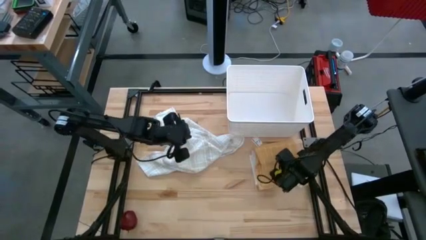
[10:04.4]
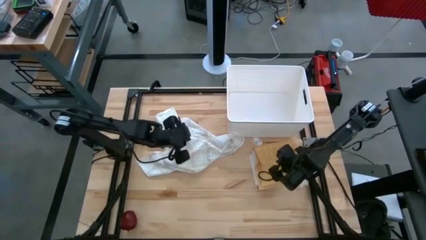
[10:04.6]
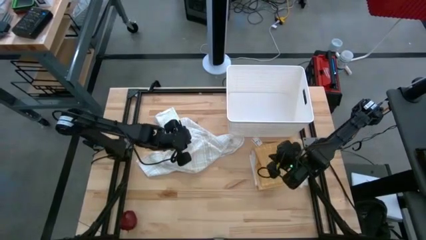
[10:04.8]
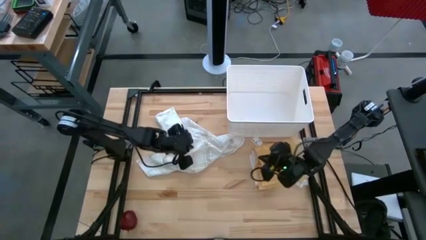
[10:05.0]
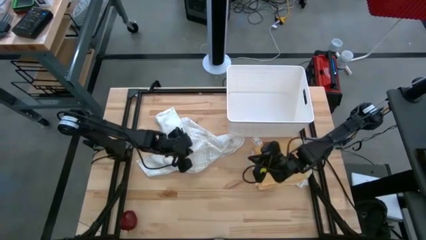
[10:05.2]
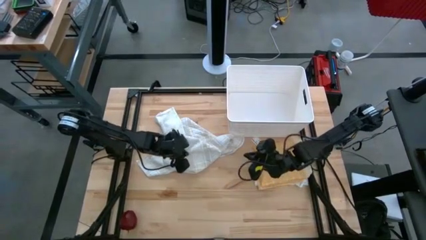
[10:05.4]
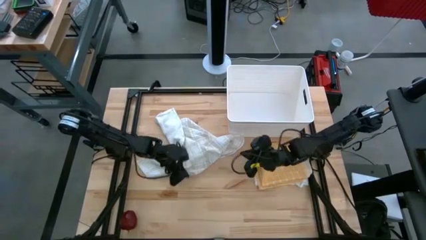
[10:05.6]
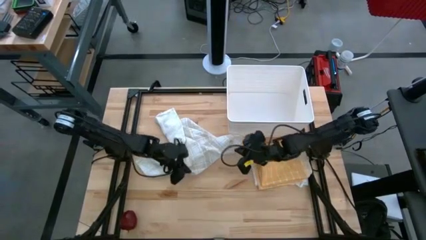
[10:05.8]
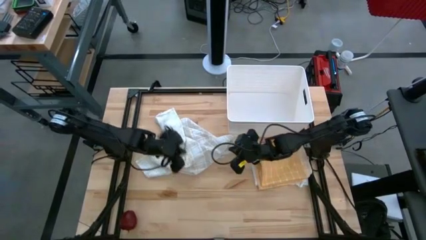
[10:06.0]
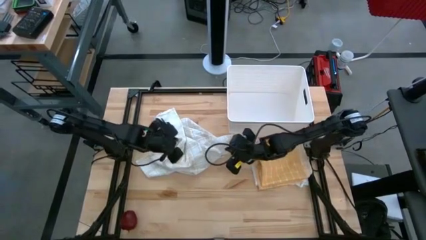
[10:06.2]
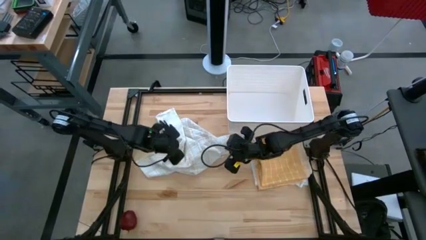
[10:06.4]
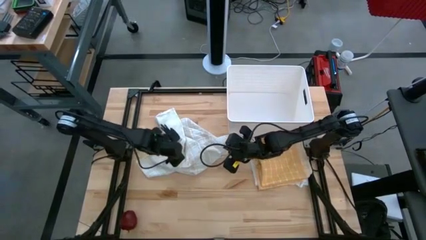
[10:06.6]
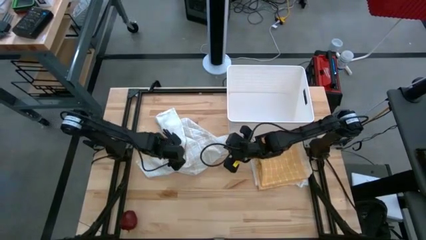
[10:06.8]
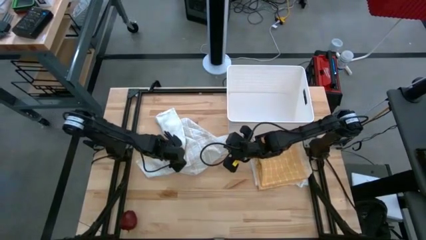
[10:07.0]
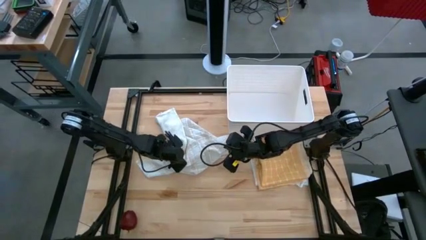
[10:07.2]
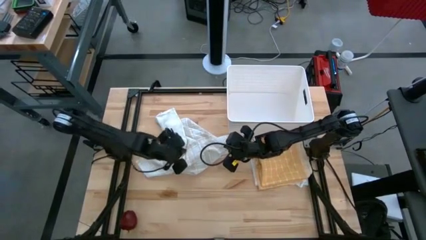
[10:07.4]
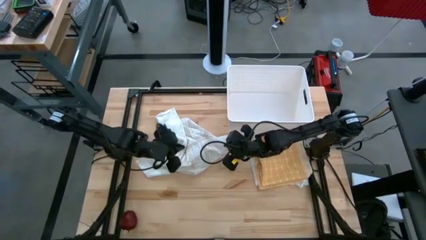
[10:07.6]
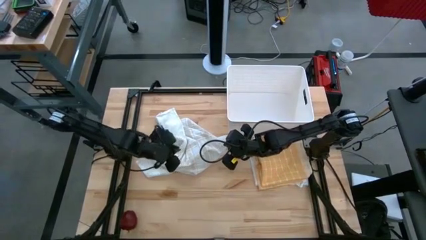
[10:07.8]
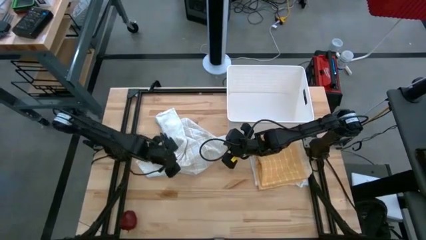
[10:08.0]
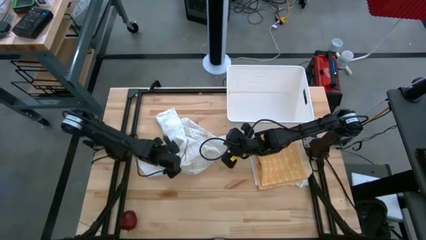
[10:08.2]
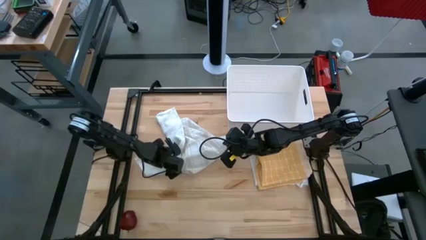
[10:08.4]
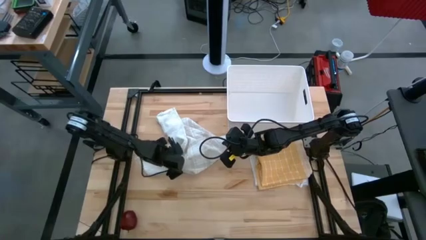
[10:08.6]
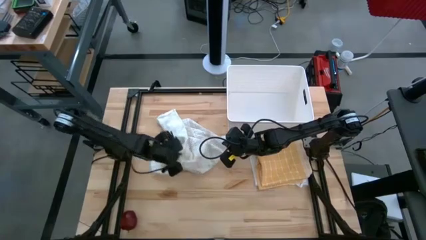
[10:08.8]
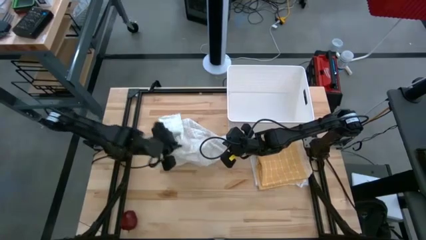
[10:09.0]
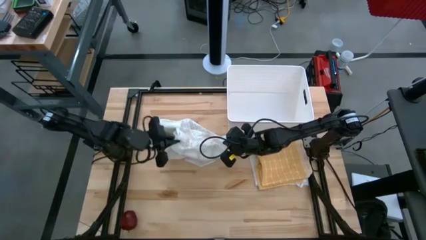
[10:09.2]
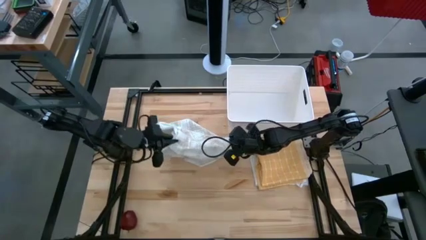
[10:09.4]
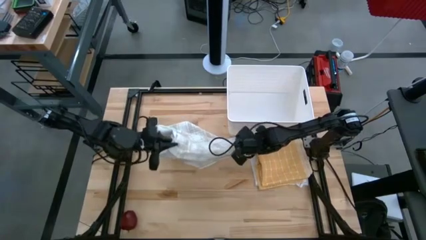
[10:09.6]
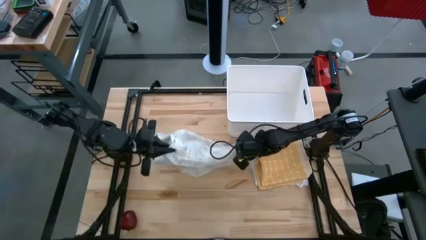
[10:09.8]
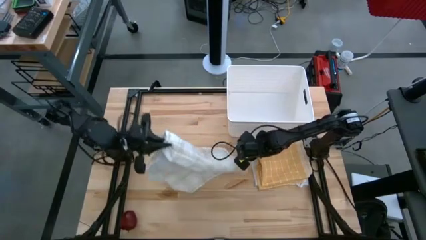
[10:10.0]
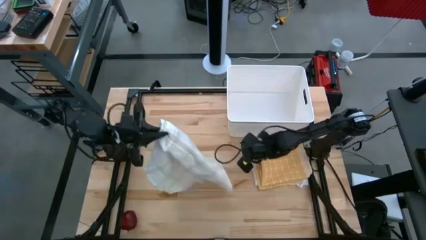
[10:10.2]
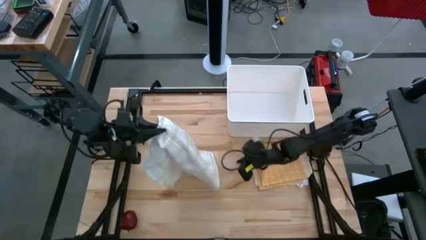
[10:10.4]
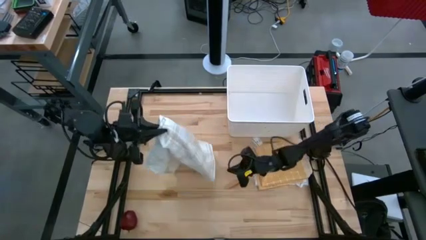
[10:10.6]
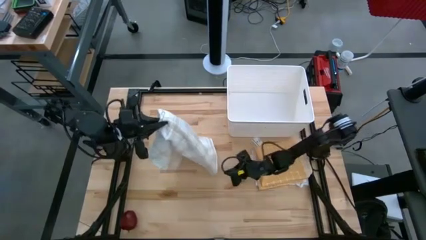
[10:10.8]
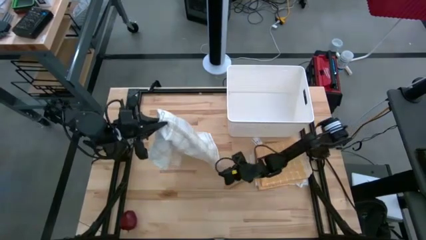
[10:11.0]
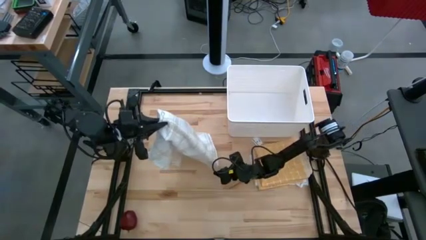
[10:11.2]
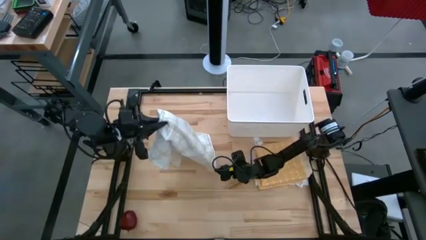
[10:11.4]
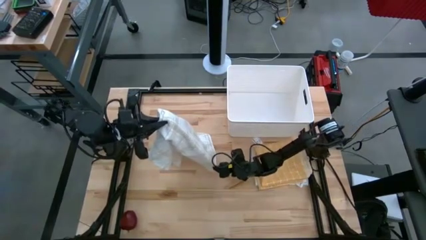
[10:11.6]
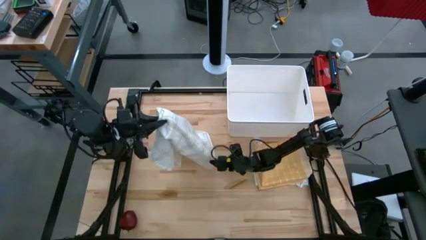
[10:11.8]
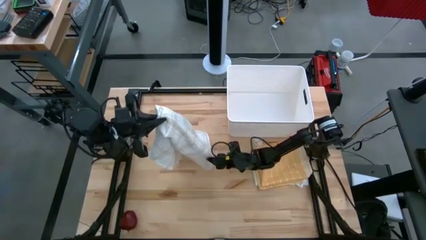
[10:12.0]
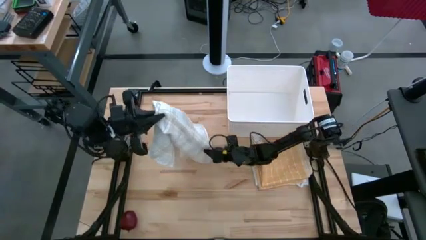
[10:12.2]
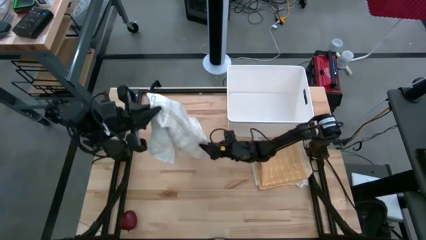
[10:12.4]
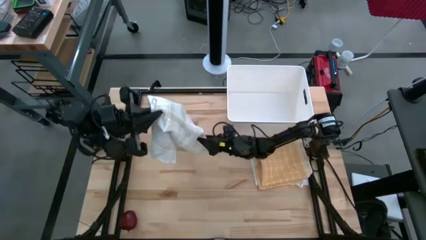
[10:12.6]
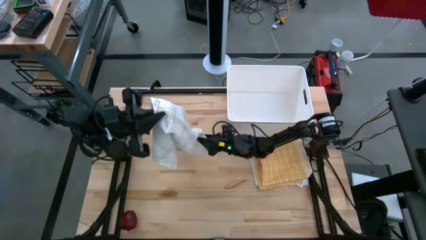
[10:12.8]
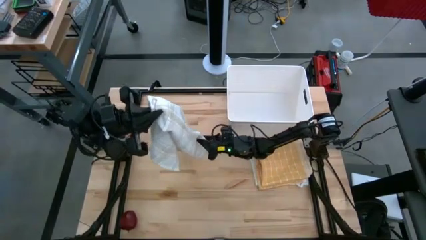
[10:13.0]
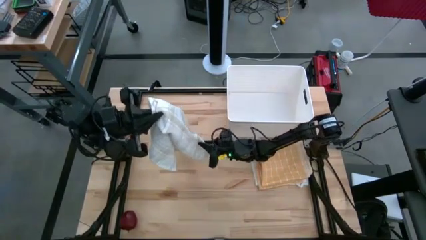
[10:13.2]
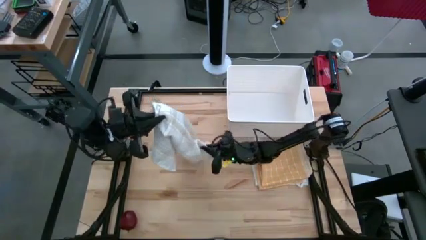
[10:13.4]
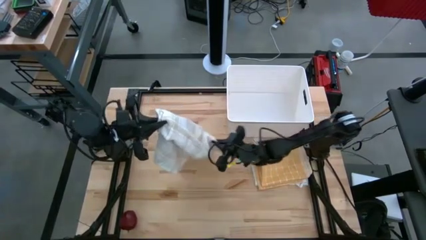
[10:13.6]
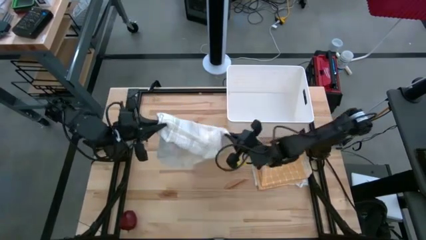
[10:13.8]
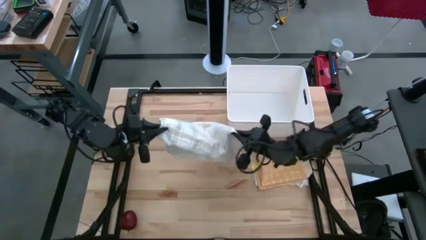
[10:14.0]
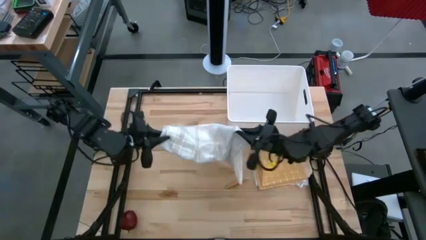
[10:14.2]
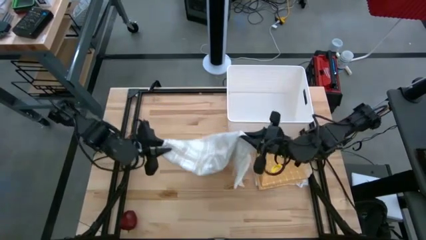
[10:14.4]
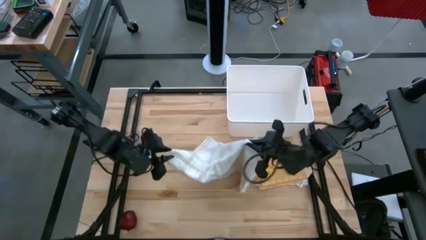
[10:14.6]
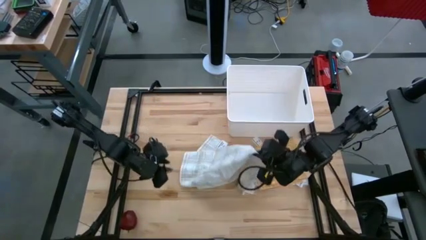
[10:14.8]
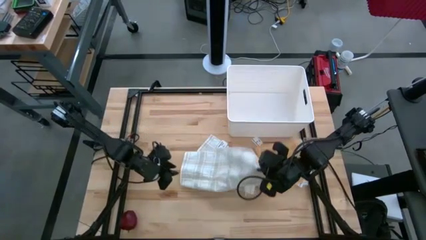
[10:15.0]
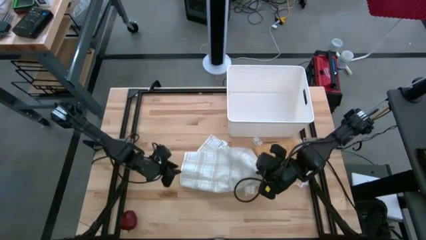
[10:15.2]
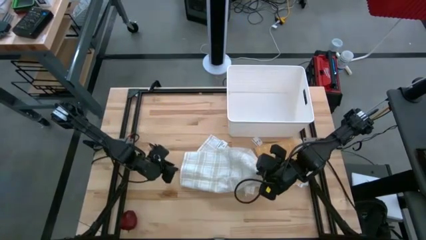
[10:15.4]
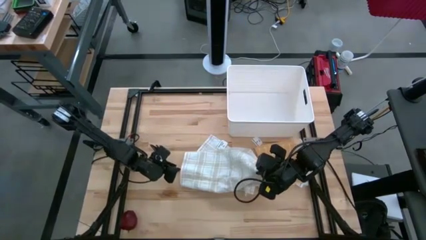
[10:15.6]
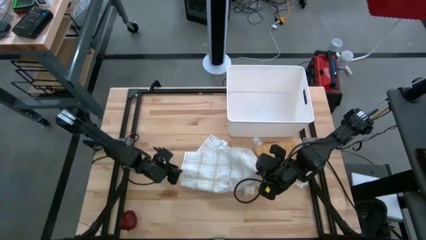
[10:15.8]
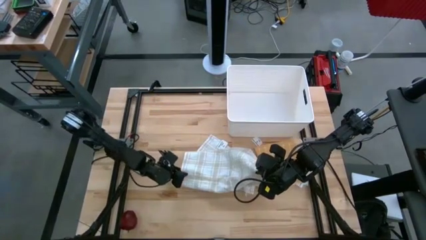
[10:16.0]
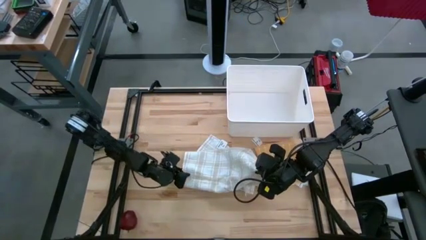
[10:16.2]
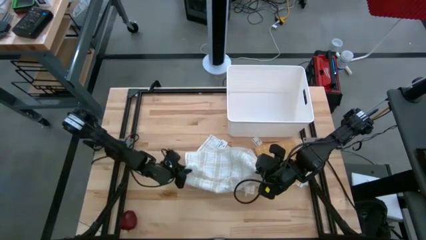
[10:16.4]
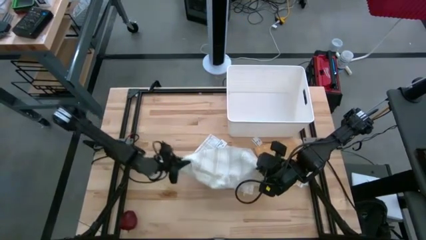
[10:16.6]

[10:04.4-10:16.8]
Task: Fold towel
Fold the white checkered towel

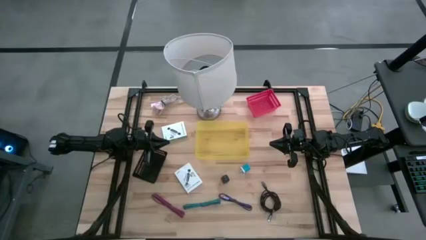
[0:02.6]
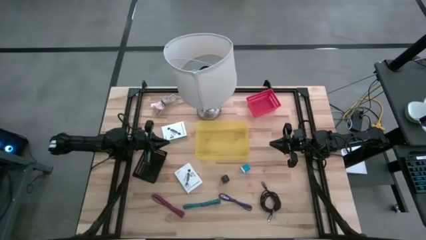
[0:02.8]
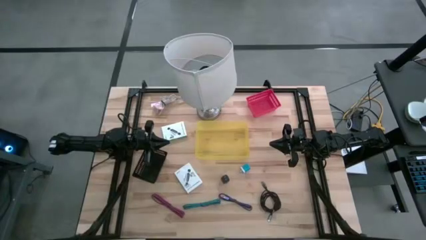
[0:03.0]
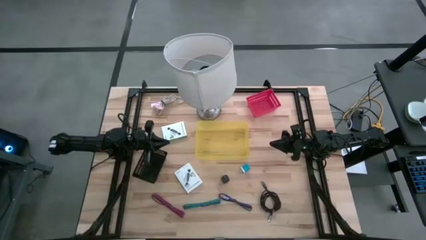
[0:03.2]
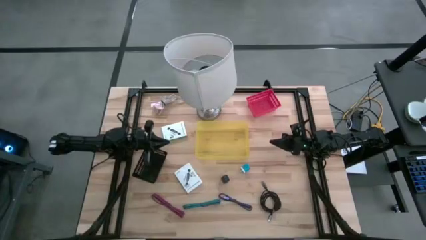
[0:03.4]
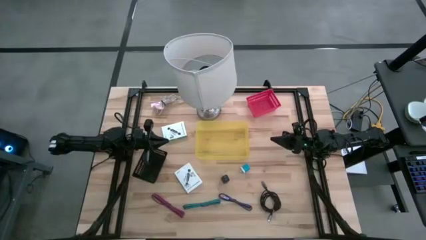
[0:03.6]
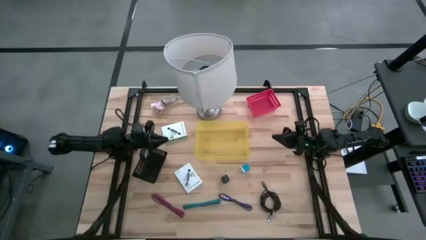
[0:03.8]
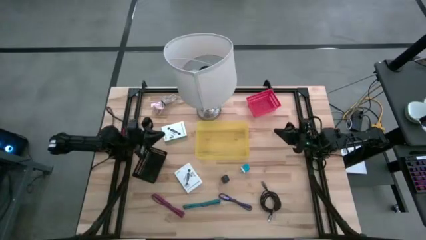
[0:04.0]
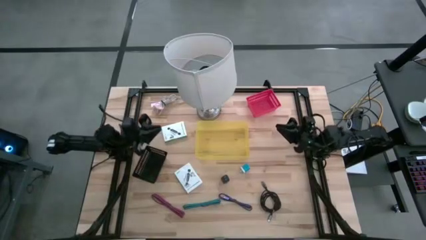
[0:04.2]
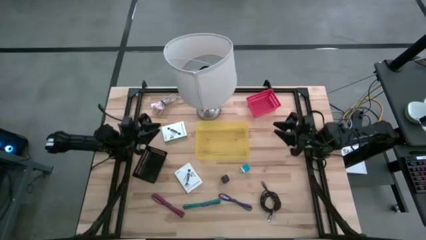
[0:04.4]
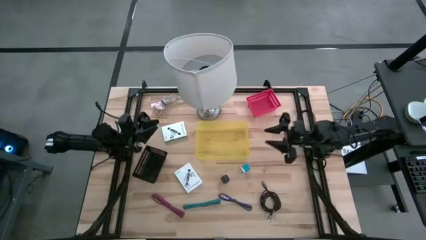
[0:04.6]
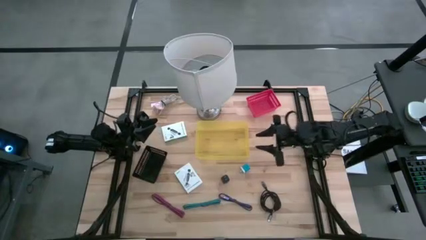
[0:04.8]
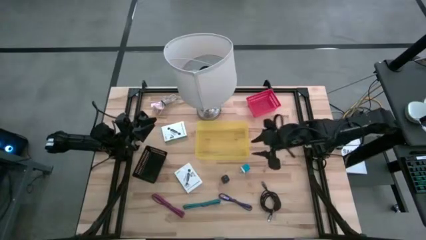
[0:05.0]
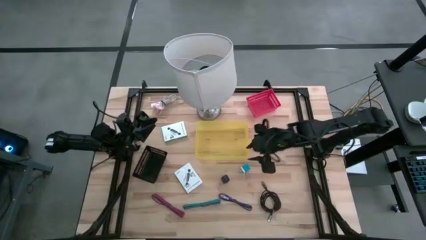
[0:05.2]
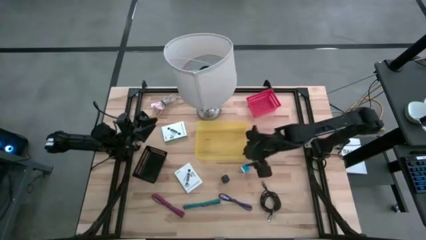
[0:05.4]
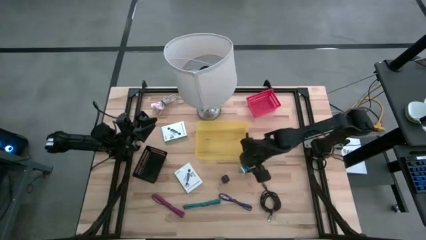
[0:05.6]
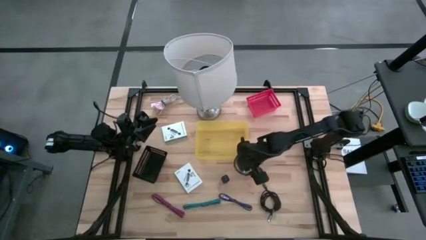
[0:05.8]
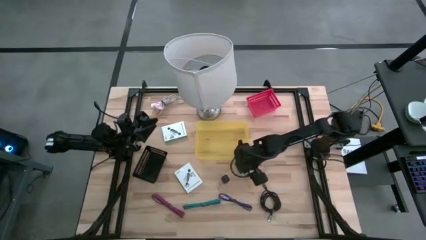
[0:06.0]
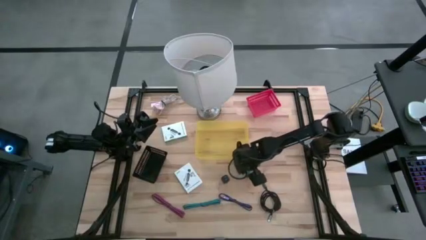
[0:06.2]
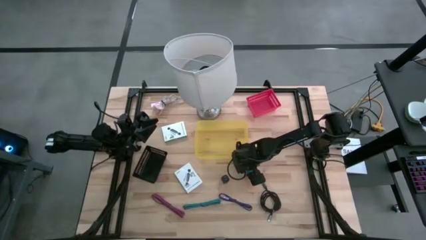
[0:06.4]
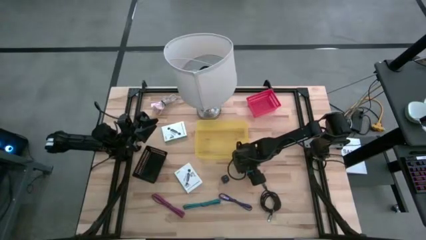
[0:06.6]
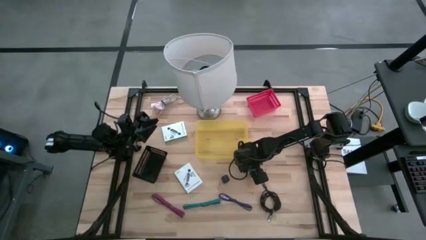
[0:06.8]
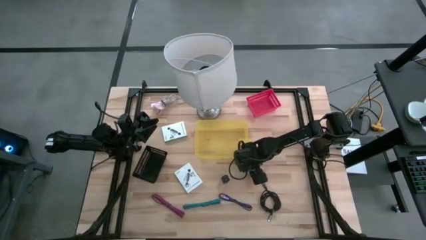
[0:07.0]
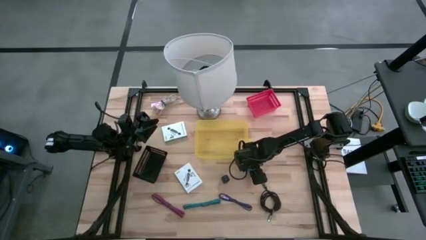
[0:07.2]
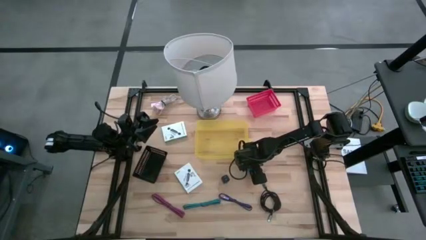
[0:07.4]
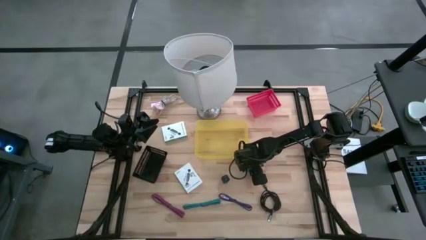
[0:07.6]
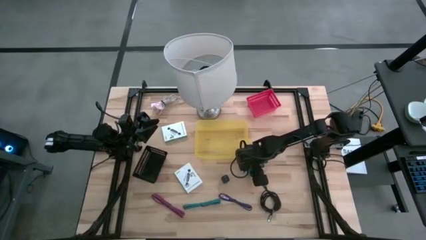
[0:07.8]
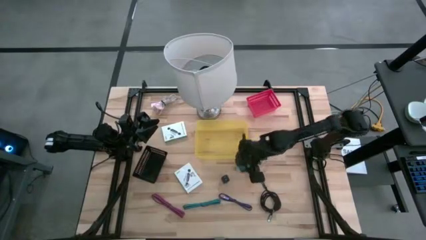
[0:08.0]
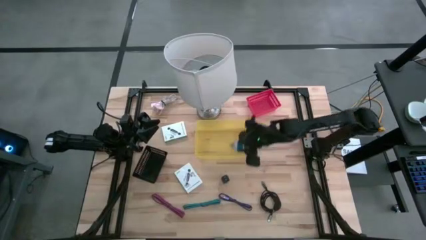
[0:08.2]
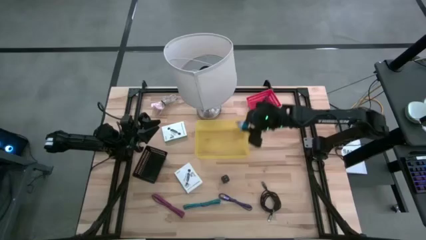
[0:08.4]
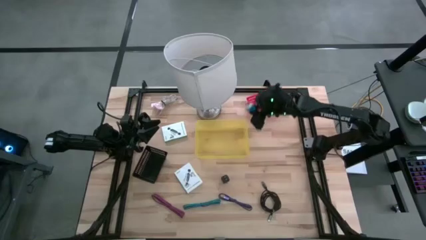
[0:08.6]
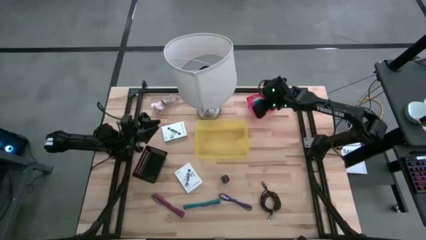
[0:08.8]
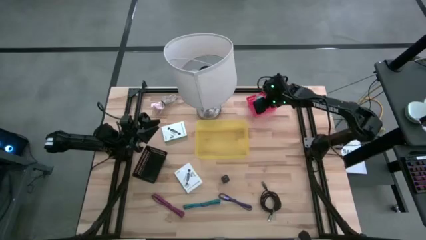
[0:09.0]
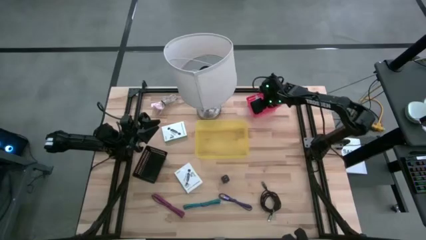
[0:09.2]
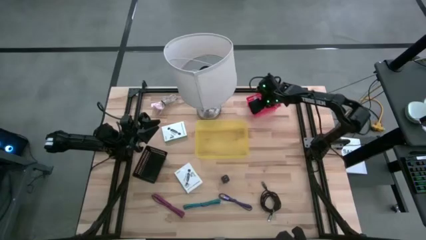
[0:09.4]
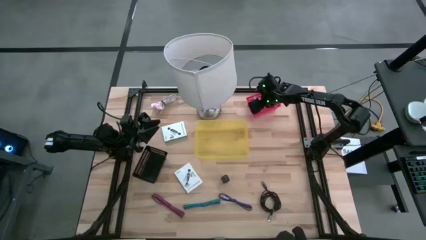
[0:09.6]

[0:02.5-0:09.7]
Task: Pick and place items into bin
Put the blue charger adapter into the red bin
